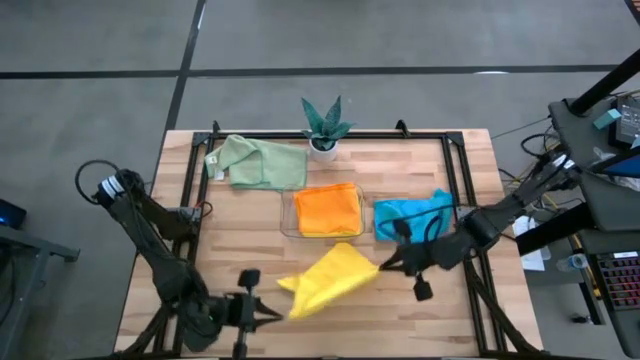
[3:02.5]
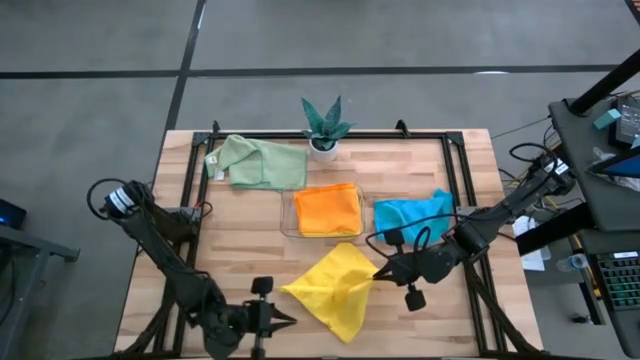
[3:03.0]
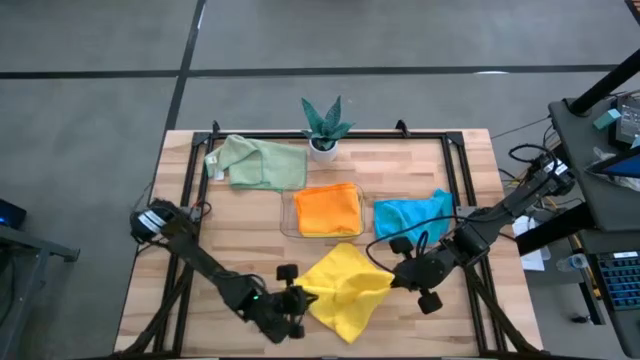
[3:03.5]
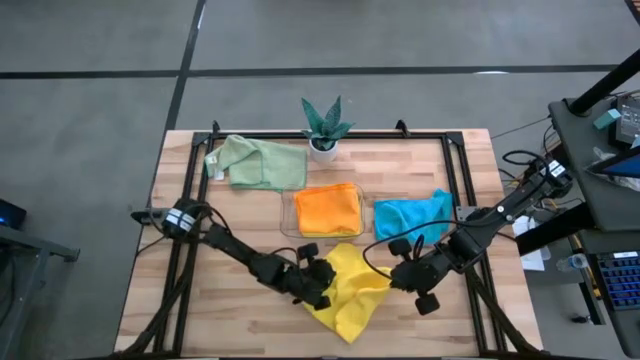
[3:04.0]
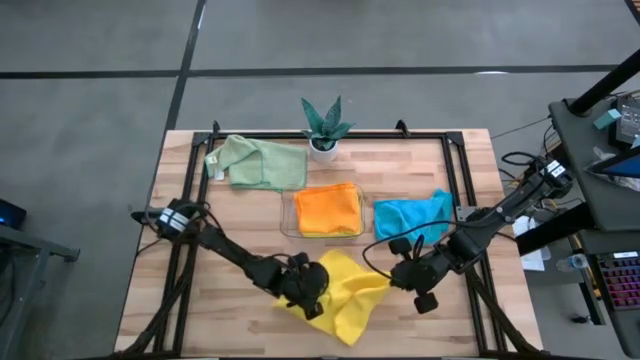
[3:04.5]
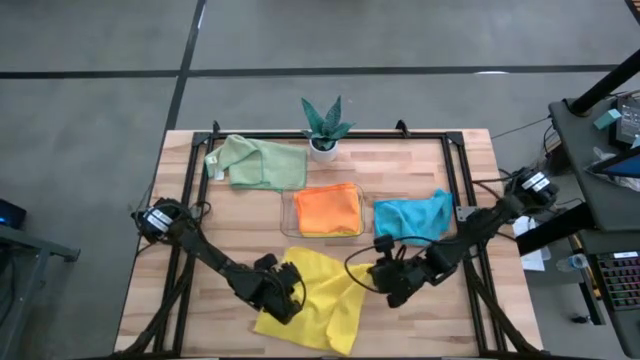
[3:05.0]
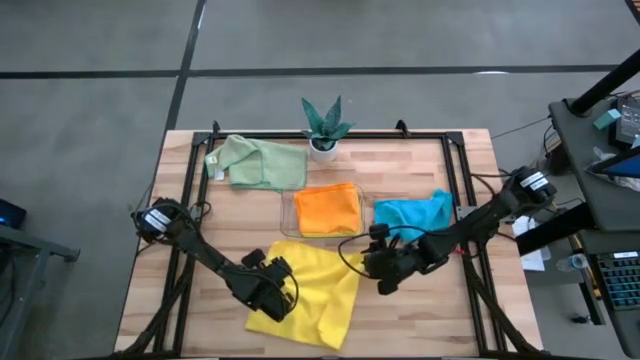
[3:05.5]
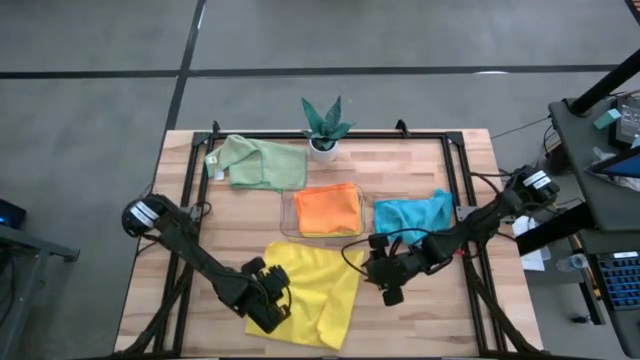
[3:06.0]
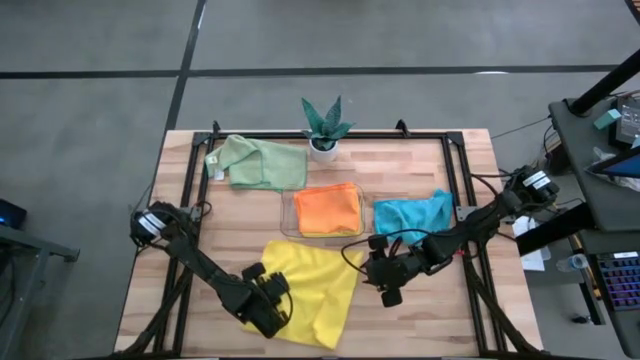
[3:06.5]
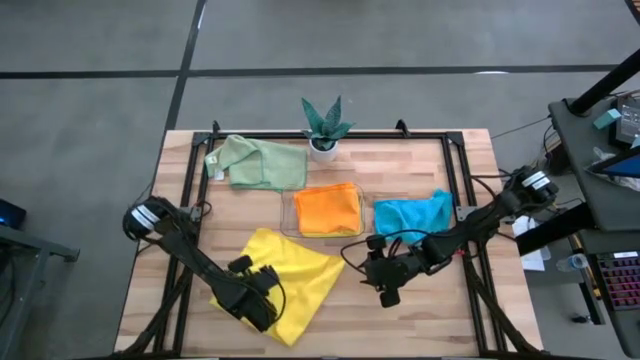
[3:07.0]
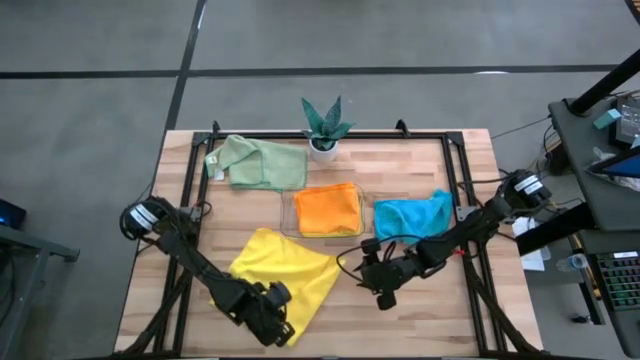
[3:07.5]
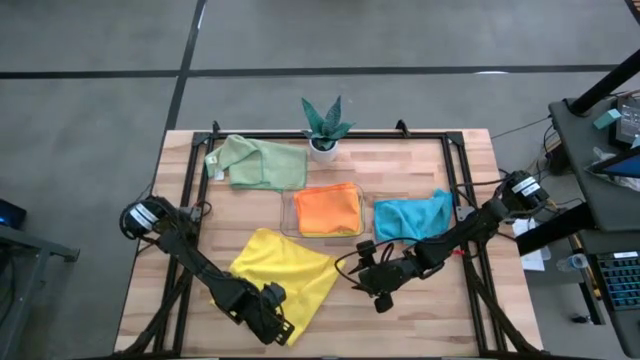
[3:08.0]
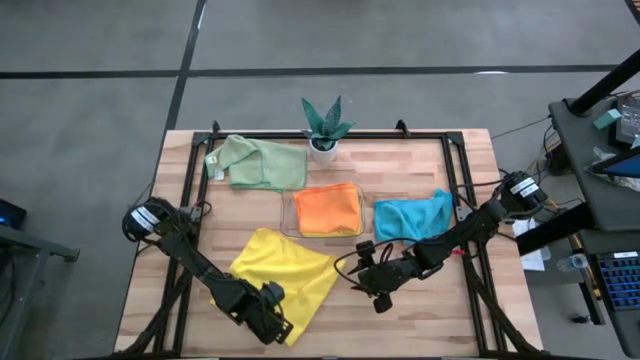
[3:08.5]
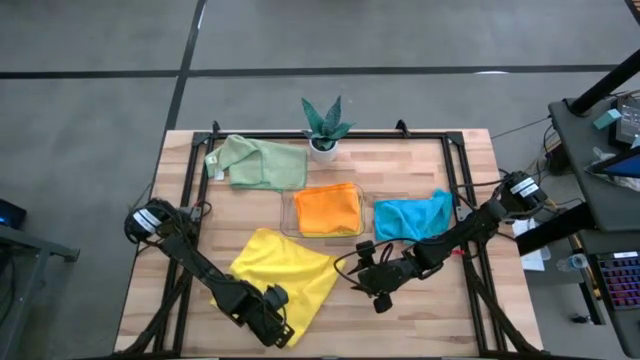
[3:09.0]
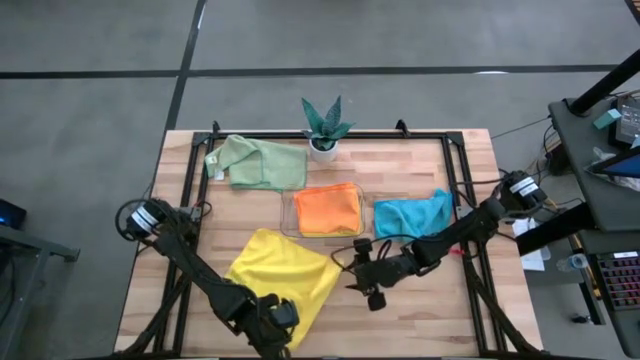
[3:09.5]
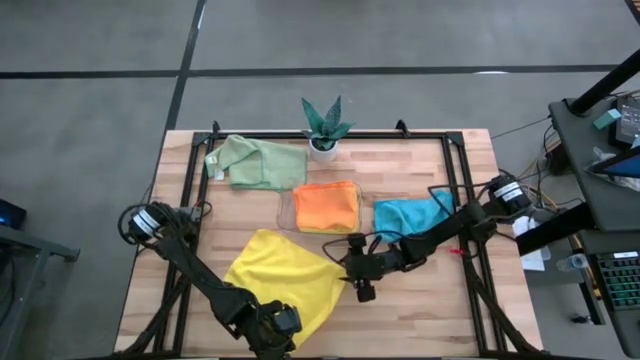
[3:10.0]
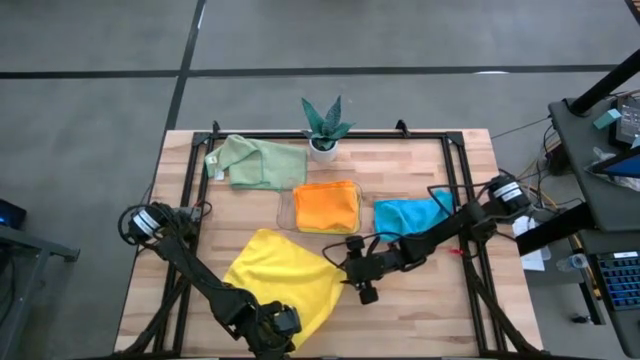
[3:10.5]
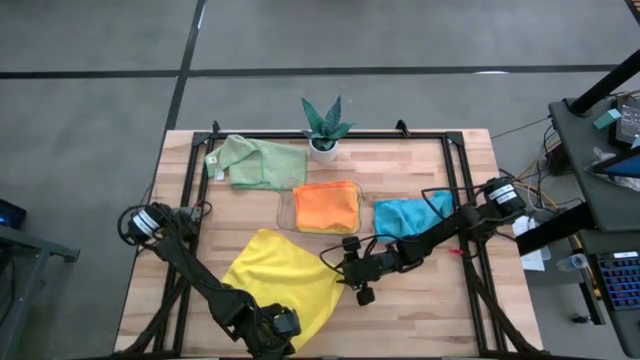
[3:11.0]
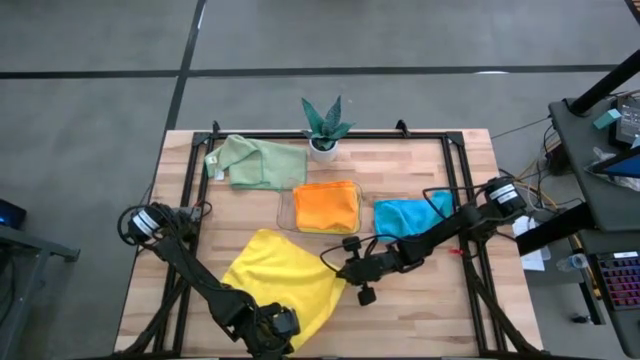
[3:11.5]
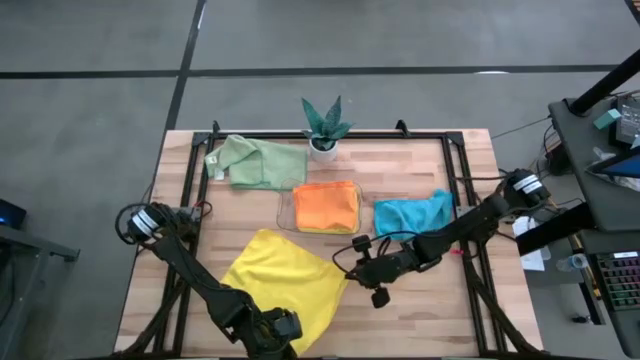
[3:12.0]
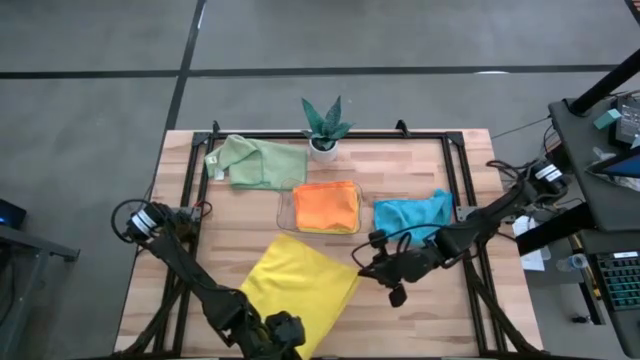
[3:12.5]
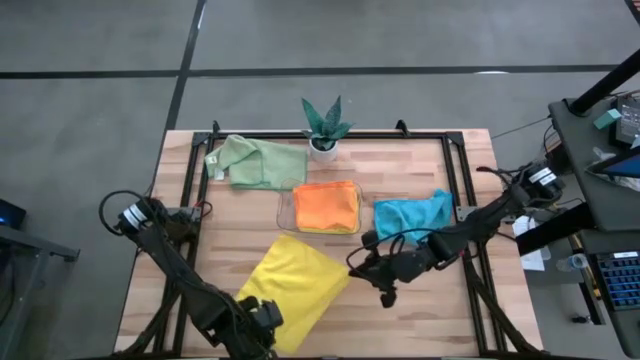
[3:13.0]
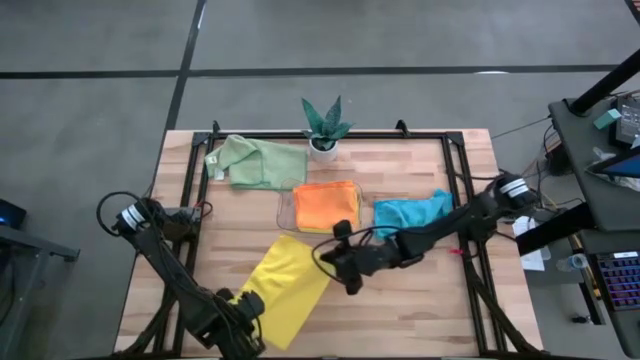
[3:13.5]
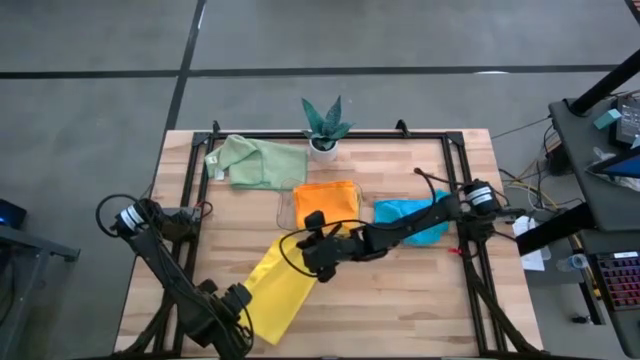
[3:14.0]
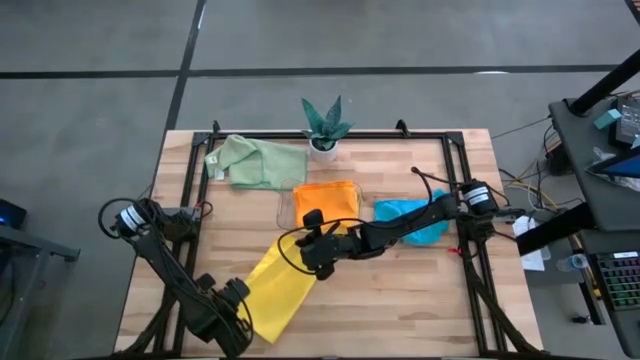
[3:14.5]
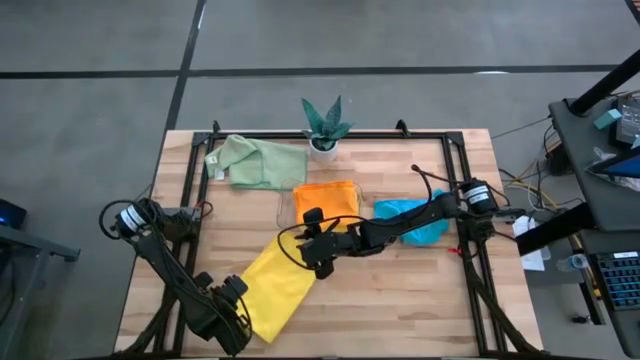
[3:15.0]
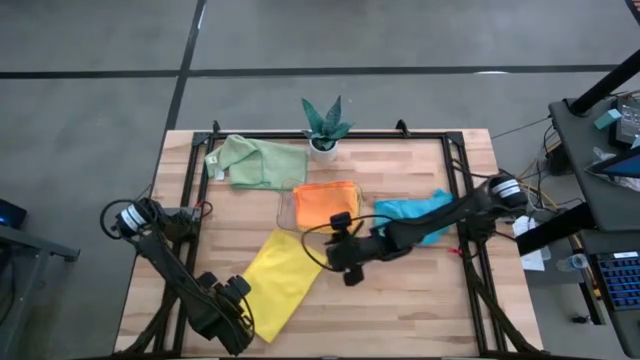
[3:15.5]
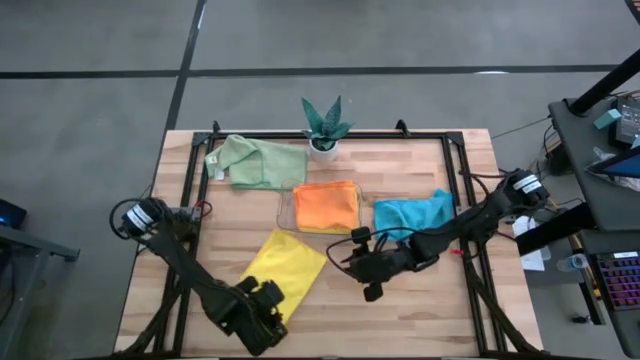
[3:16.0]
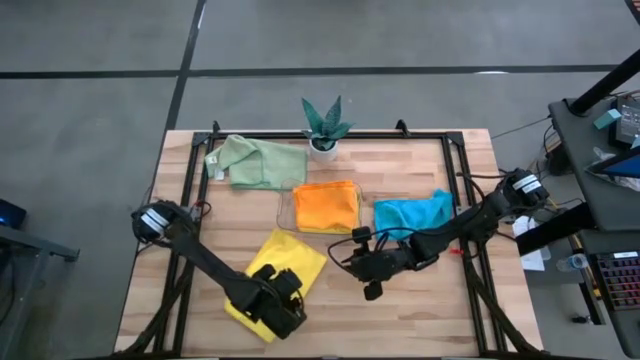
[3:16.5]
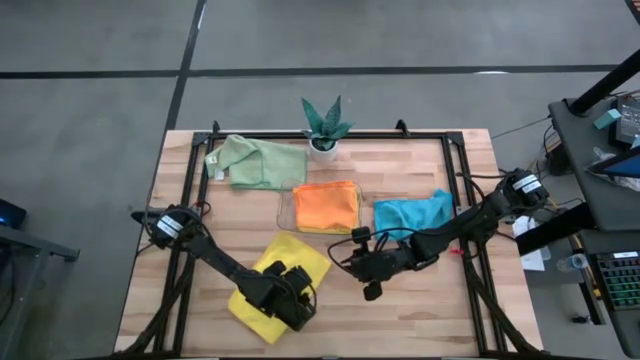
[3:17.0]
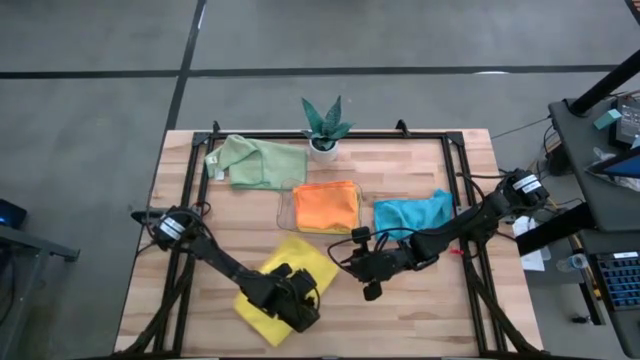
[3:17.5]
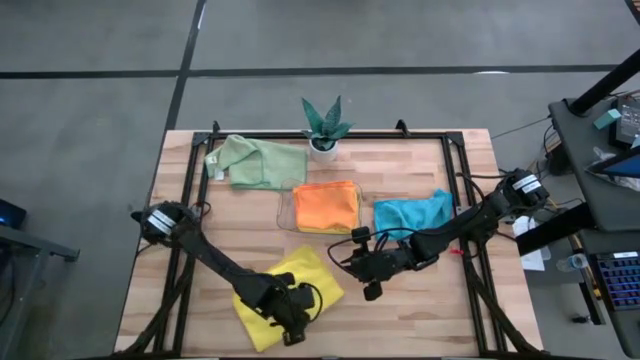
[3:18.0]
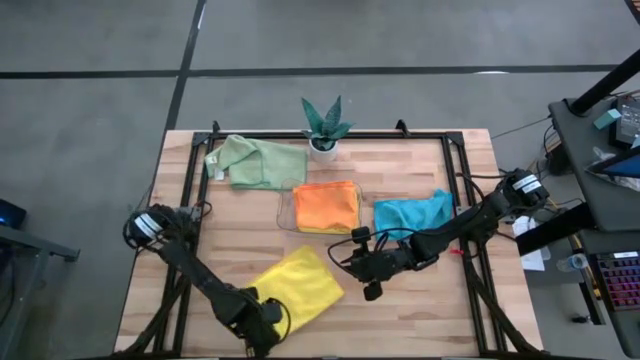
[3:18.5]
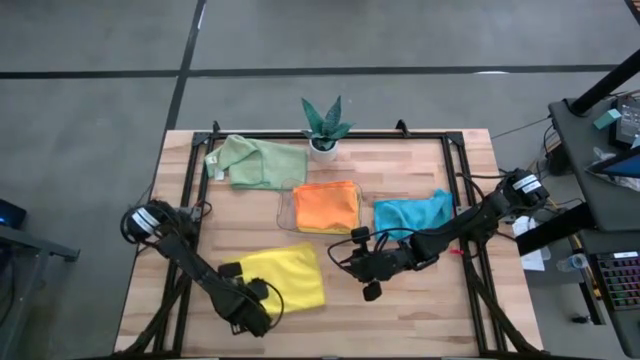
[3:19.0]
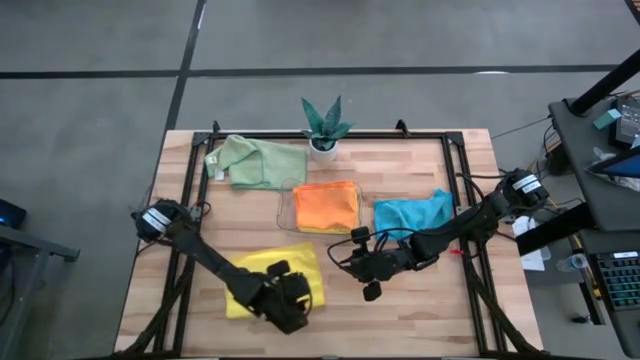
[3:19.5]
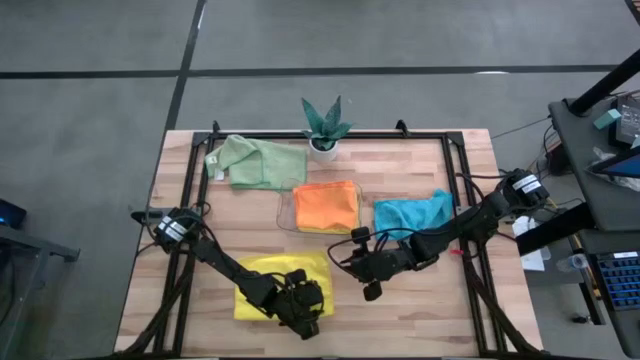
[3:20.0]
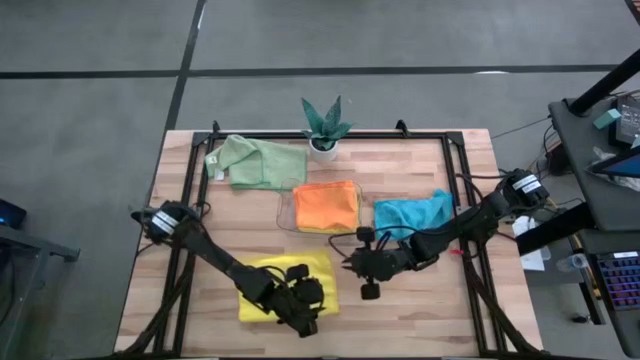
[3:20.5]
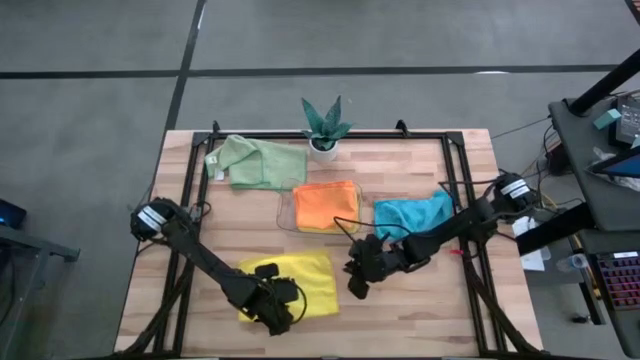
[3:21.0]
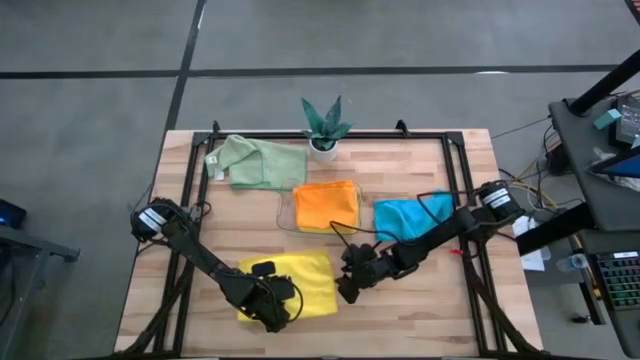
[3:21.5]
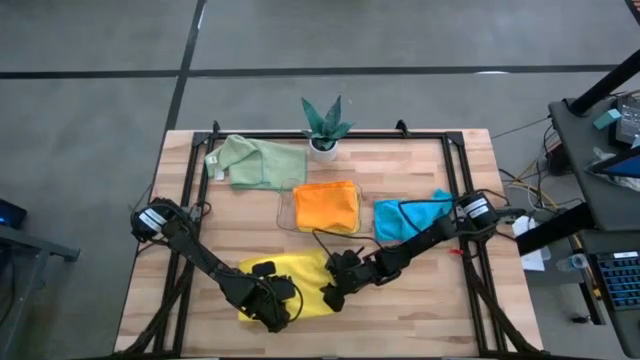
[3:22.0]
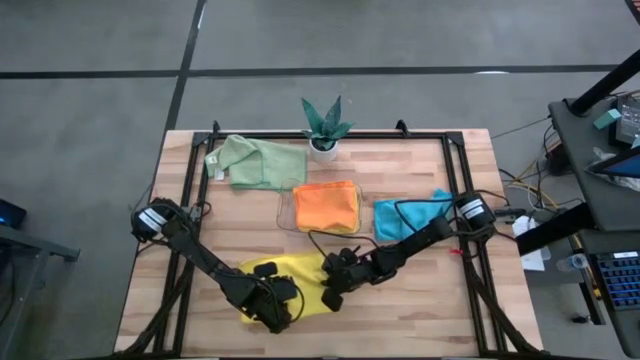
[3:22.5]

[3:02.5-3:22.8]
Task: Fold microfiber towels
Fold the yellow microfiber towel
